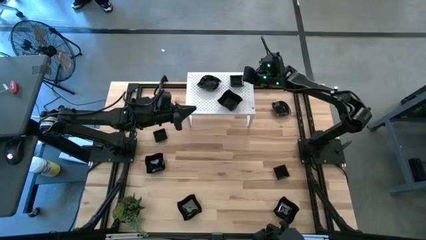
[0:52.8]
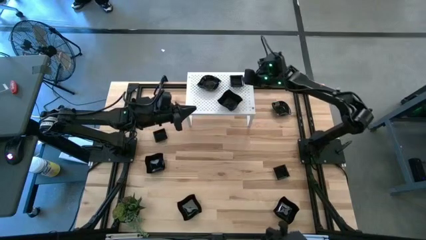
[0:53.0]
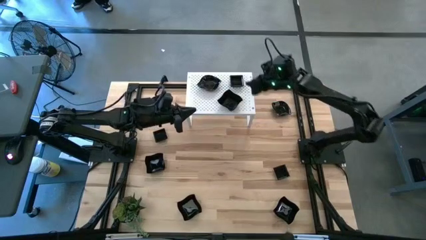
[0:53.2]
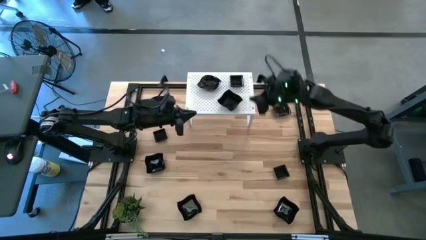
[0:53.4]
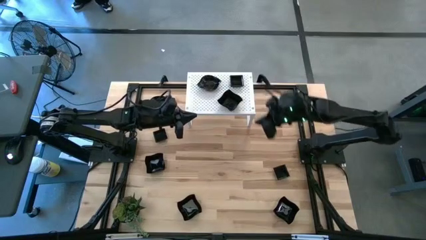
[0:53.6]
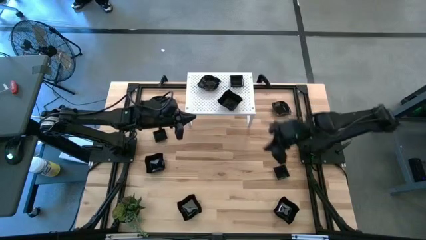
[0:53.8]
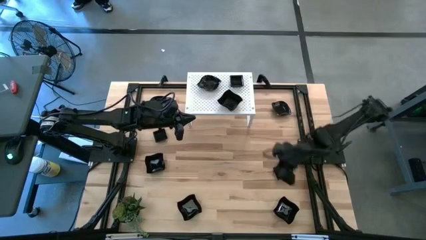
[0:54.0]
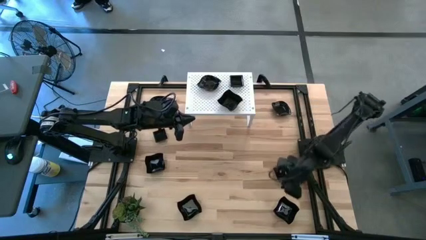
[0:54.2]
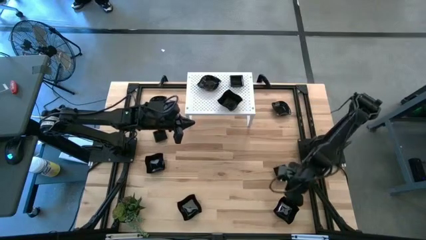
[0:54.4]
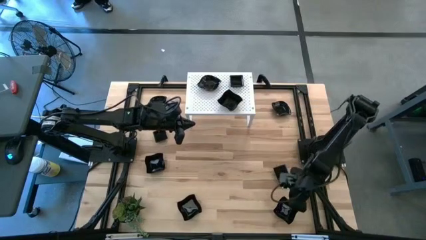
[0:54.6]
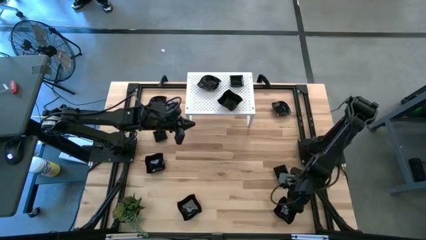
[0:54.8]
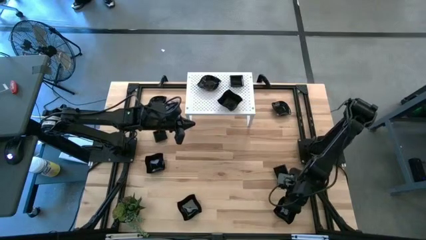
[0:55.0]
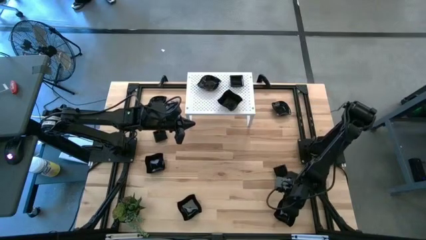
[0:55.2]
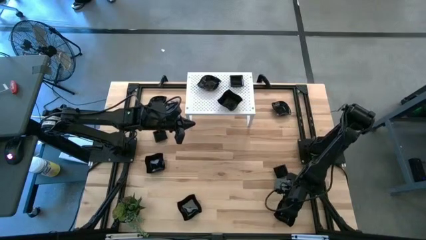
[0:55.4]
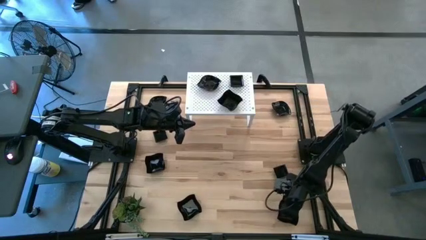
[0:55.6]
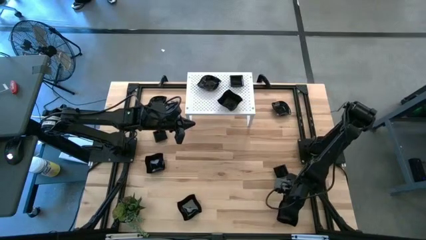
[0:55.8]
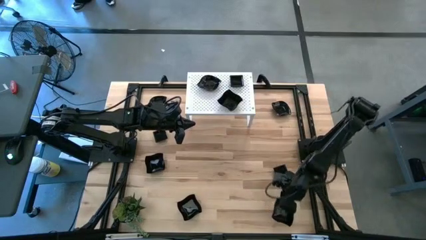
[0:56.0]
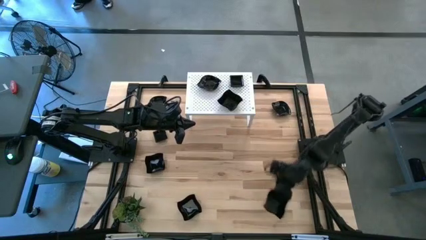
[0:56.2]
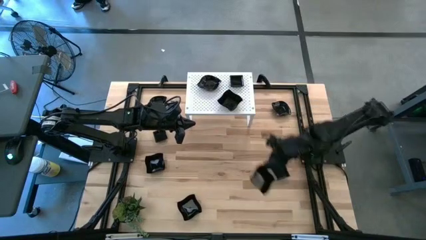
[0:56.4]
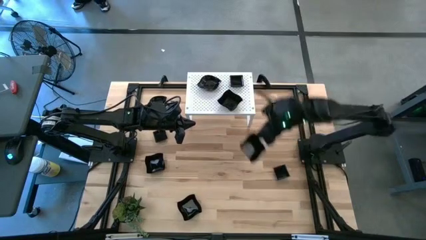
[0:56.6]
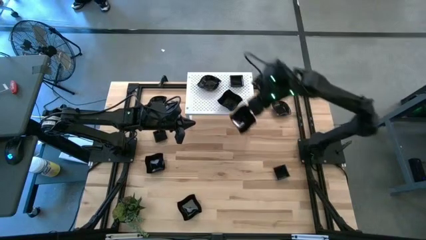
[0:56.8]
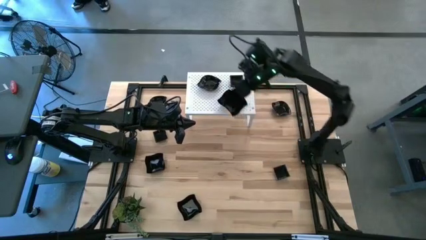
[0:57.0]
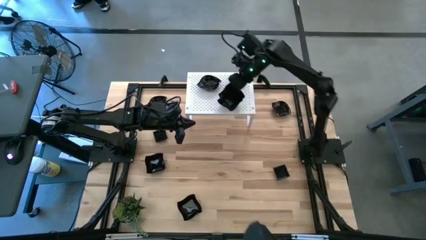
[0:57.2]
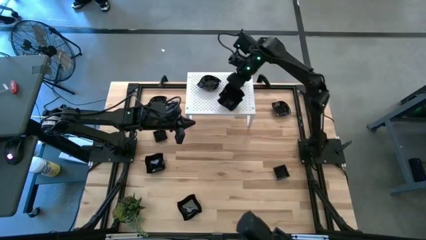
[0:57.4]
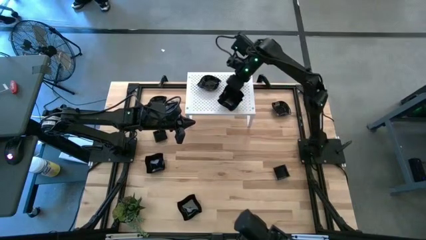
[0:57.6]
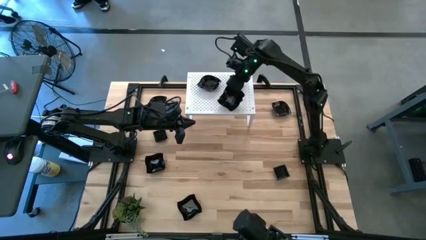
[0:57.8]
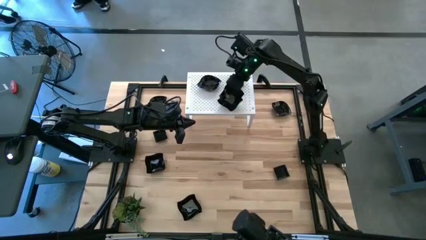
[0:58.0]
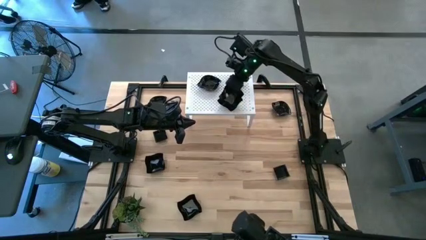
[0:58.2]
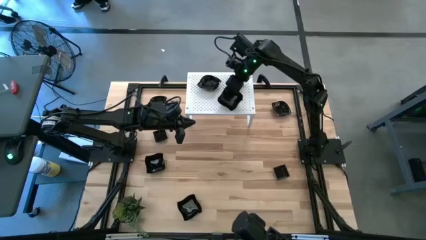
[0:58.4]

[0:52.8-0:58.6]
Task: Pick & Place Mini shaped plates
Stack the distorted square plate on top of the distorted square plate on the shelf

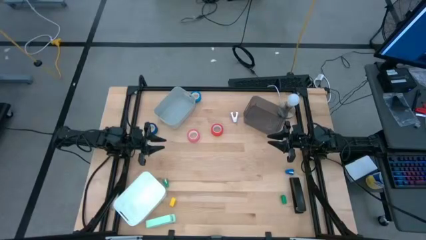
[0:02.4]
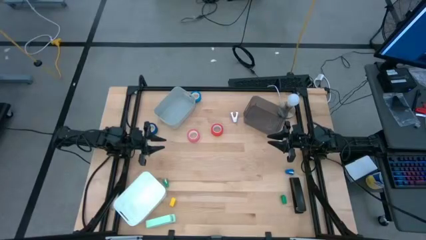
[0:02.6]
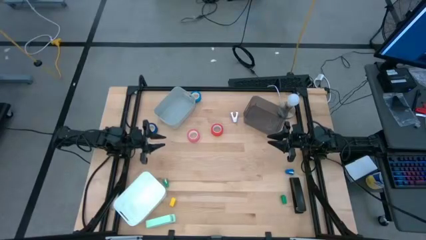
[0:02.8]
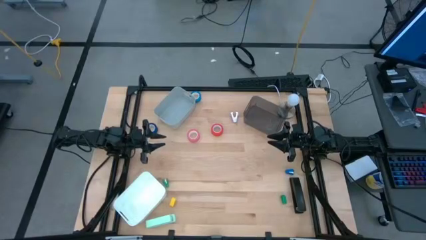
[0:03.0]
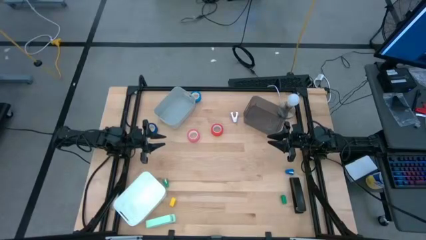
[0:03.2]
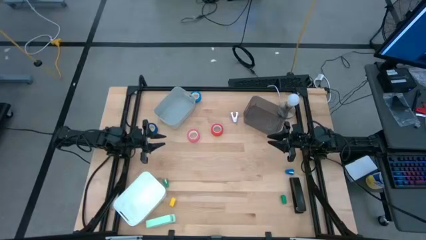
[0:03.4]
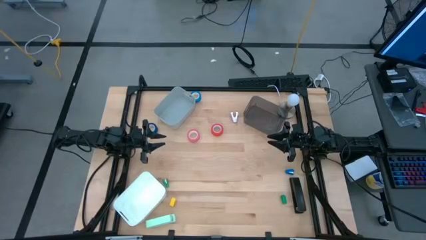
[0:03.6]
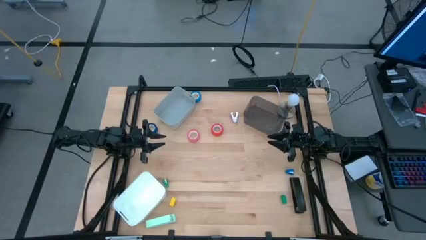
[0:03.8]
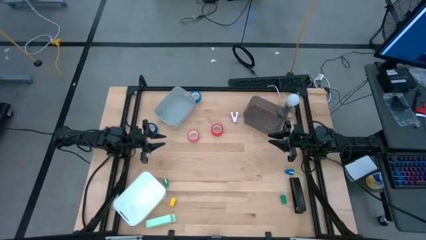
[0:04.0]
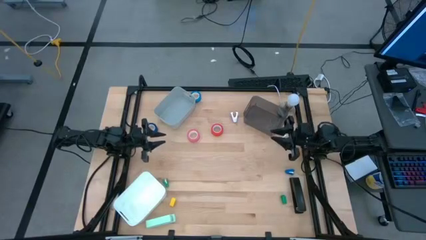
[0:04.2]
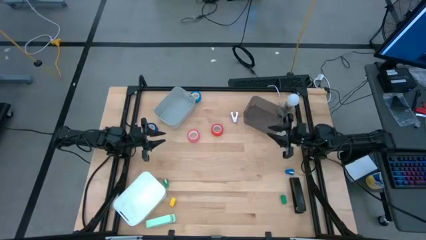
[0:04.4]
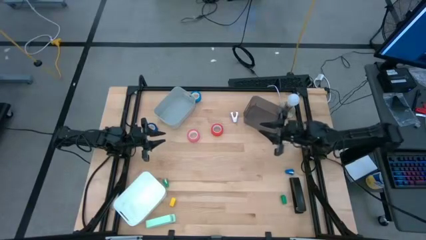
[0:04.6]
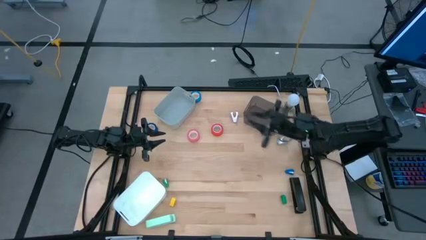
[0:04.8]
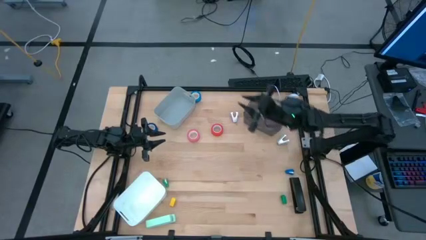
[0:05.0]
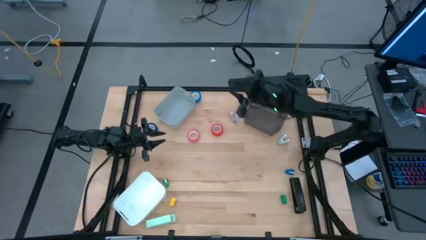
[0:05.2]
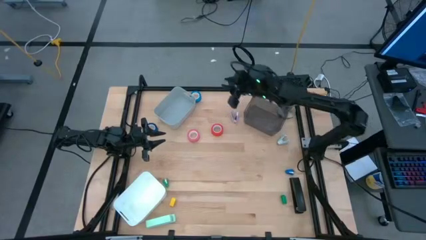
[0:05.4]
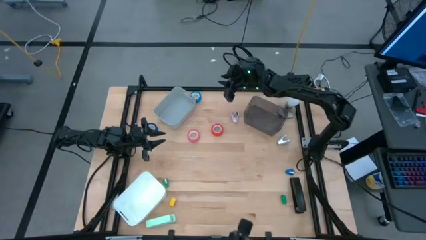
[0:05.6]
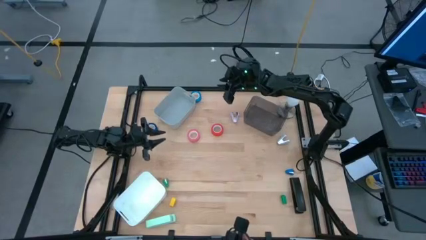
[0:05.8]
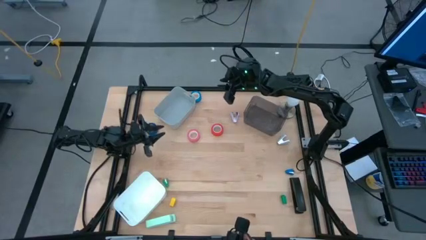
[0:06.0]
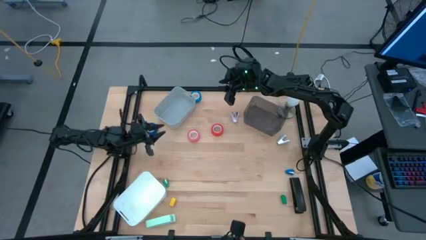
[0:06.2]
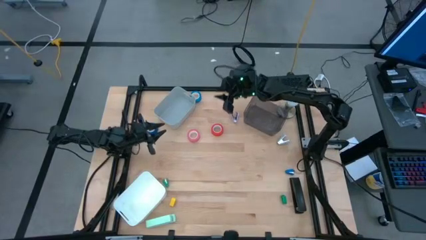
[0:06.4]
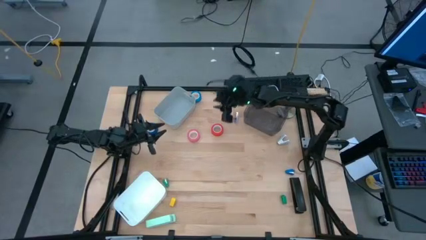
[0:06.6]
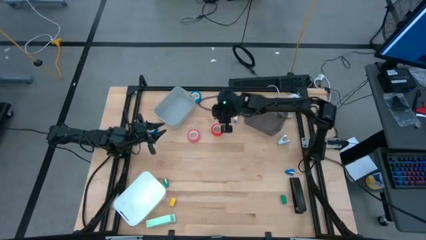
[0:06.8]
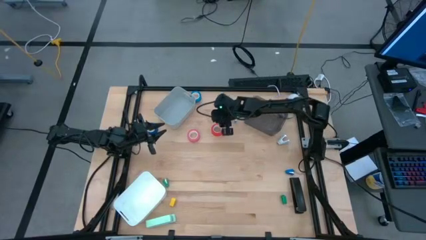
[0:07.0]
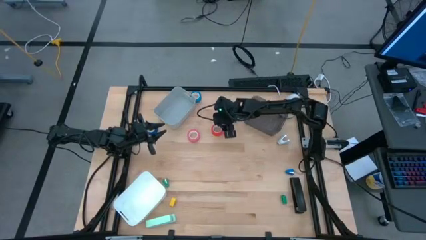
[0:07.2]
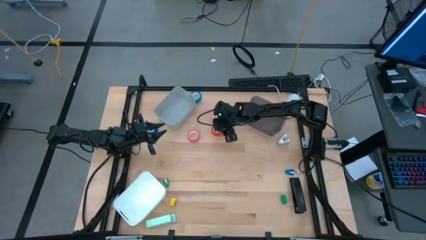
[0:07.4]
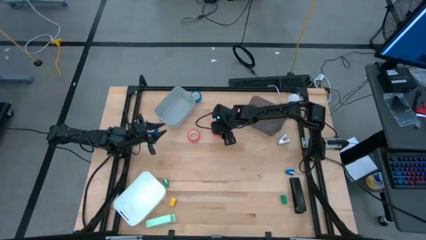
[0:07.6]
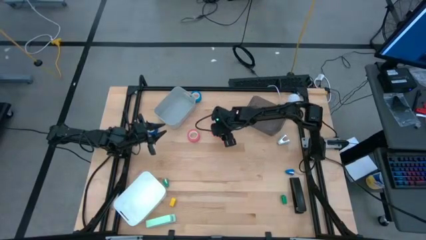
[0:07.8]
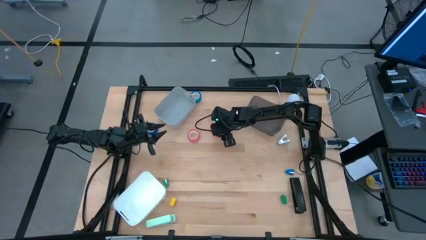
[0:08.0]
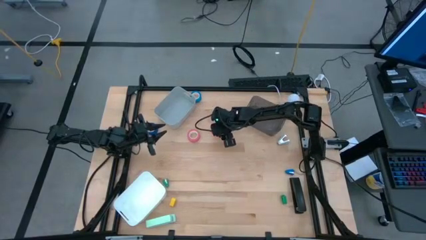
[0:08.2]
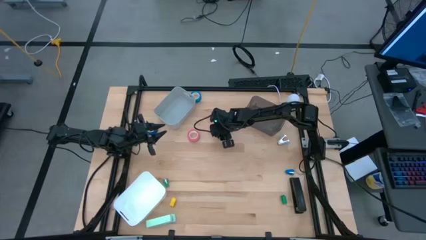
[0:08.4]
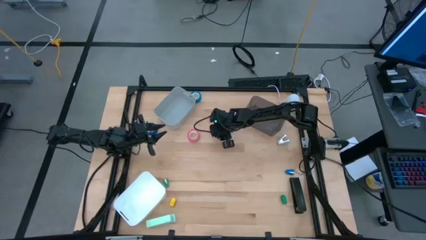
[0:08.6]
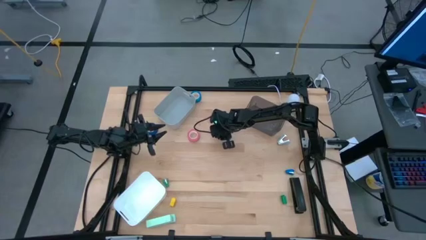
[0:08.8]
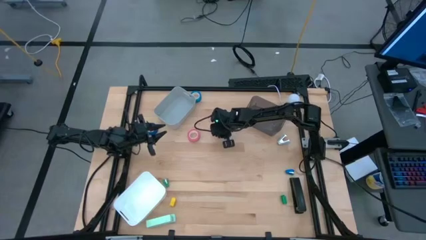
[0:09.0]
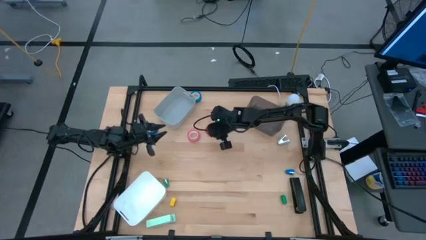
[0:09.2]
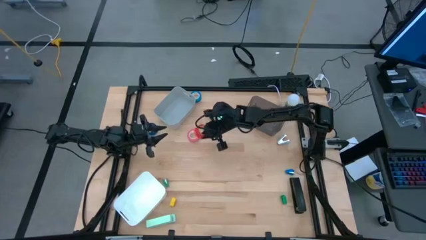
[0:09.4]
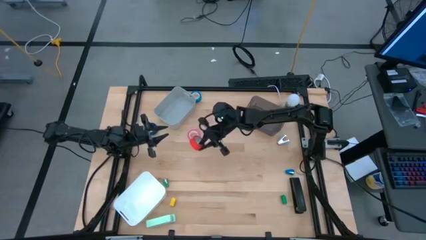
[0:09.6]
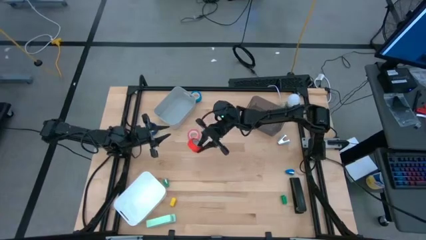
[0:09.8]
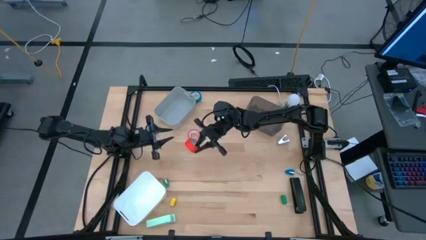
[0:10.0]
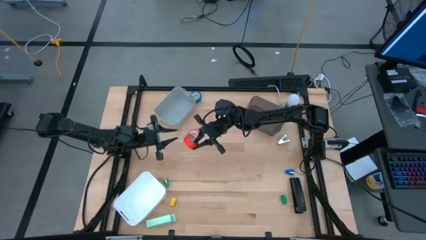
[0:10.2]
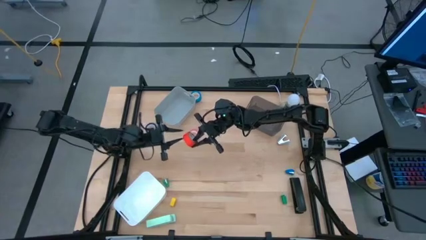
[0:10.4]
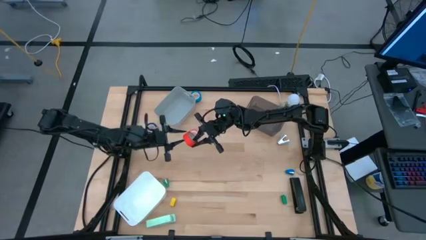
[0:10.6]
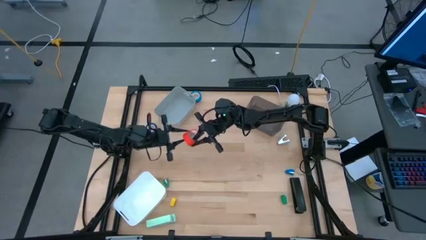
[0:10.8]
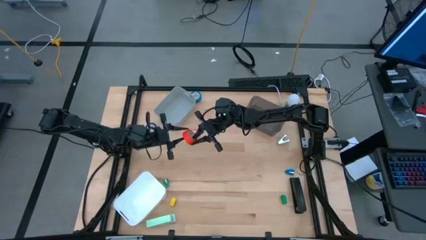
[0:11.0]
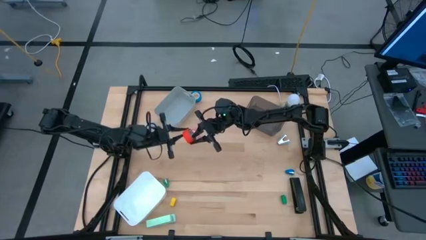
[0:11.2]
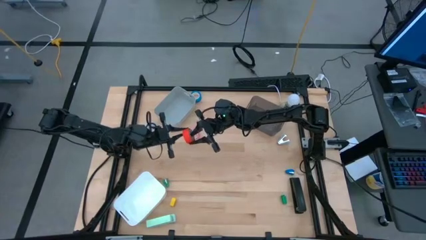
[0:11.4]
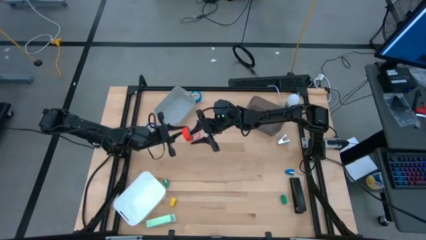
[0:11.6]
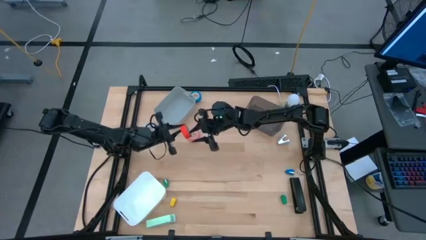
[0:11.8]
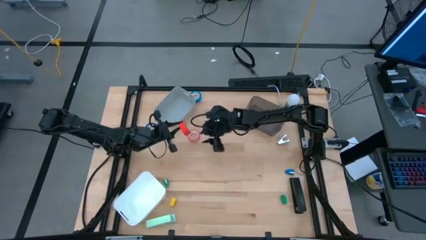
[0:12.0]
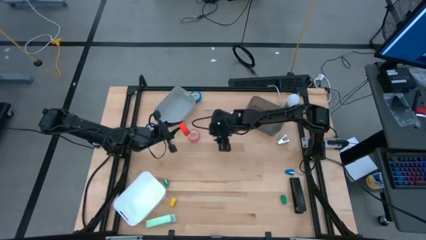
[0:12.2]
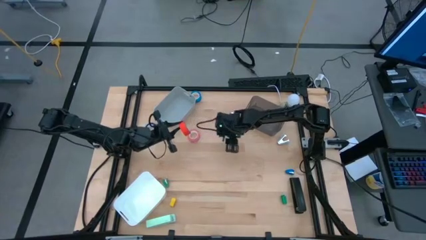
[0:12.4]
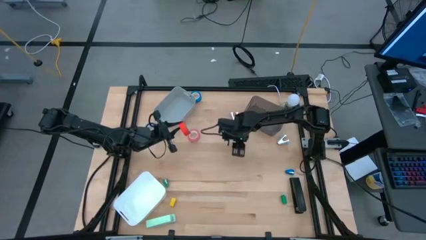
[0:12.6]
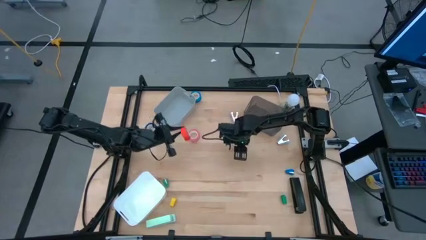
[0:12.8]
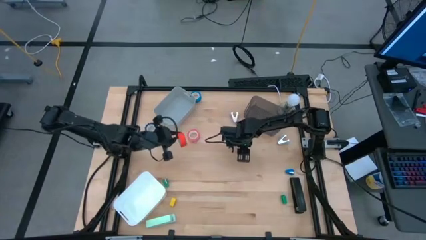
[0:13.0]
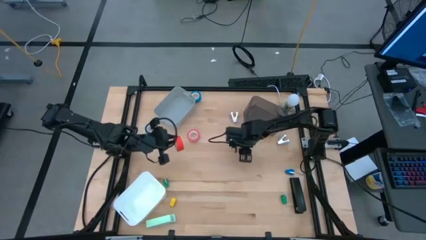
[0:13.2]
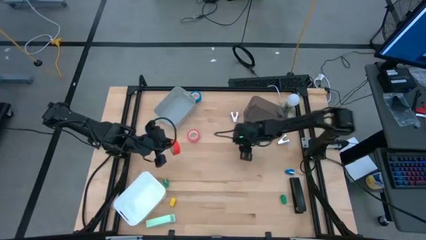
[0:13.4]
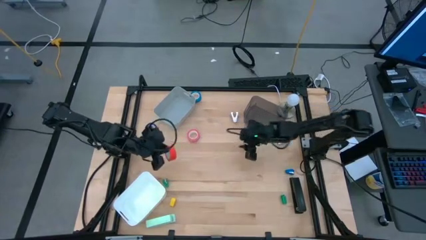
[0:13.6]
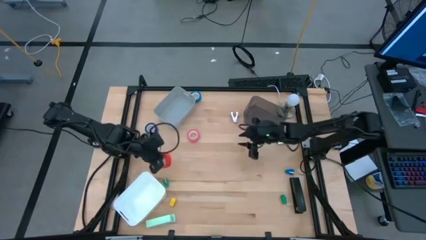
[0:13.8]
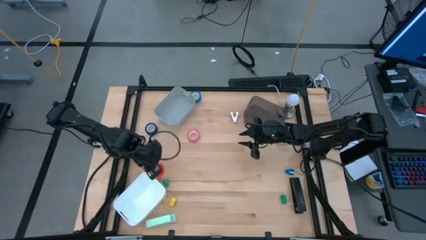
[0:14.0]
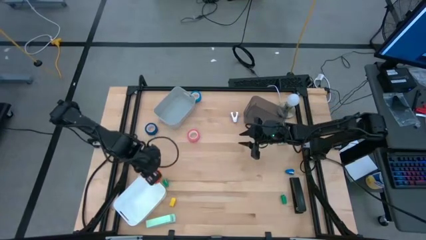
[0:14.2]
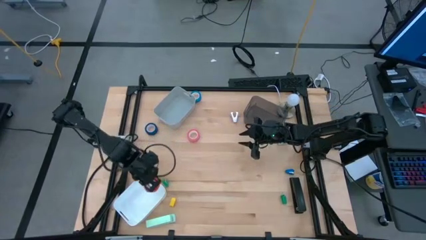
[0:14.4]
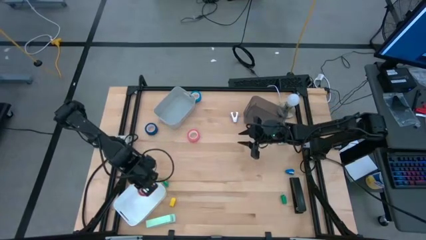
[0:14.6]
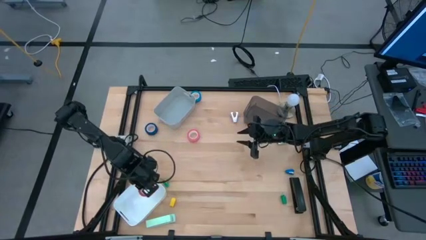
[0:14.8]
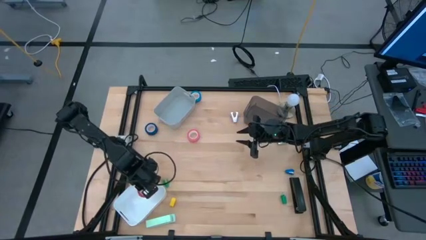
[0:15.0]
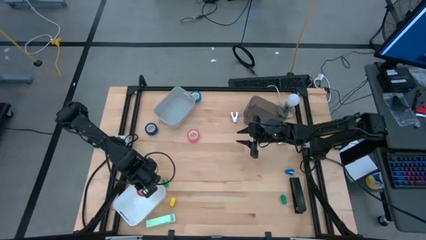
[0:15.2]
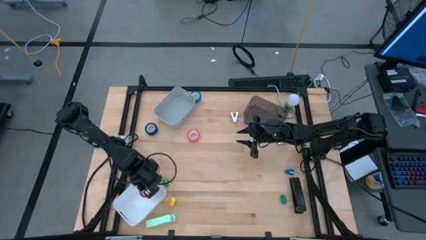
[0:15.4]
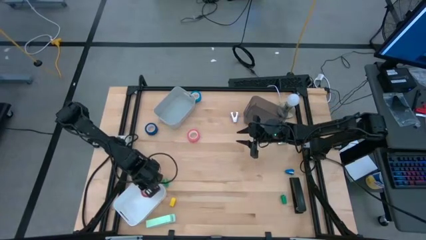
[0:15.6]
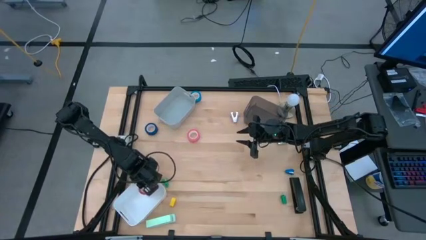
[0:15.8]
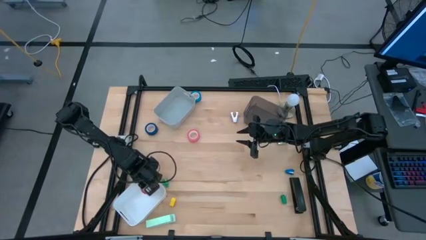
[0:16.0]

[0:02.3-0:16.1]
Task: Pick and place Stapler, Stapler remover, tape
Put the orange tape into the white bin
